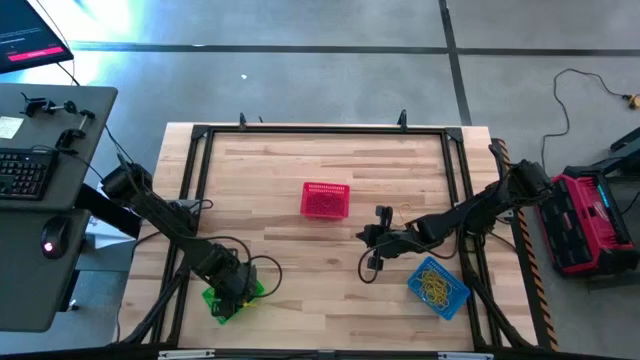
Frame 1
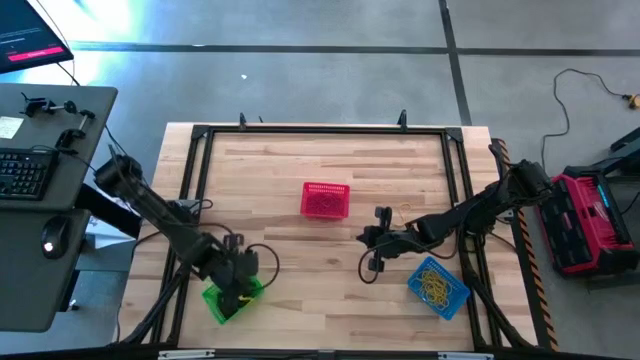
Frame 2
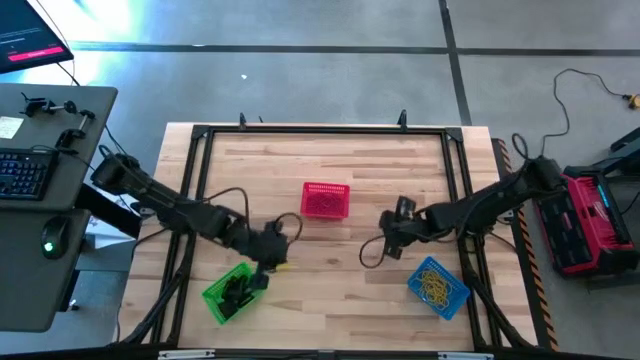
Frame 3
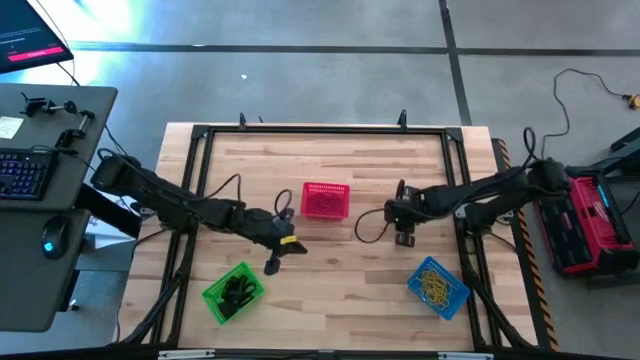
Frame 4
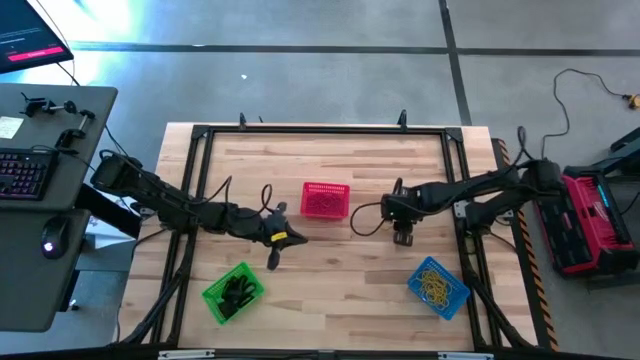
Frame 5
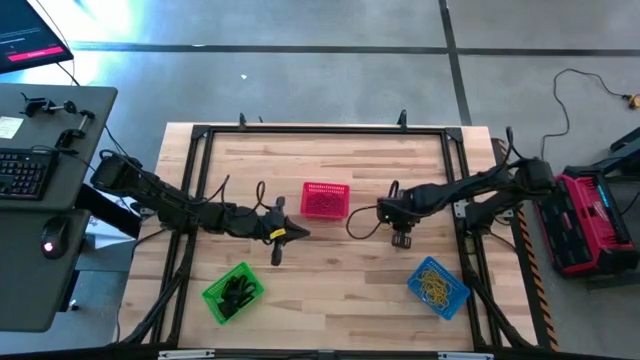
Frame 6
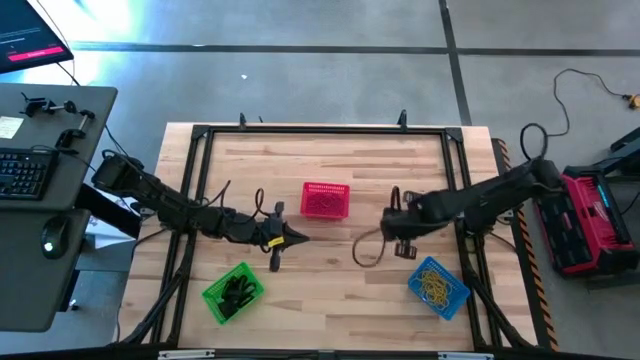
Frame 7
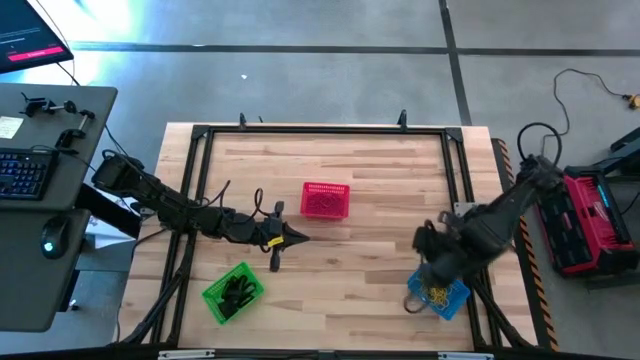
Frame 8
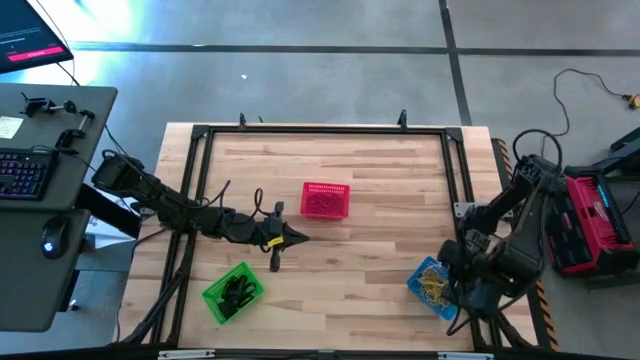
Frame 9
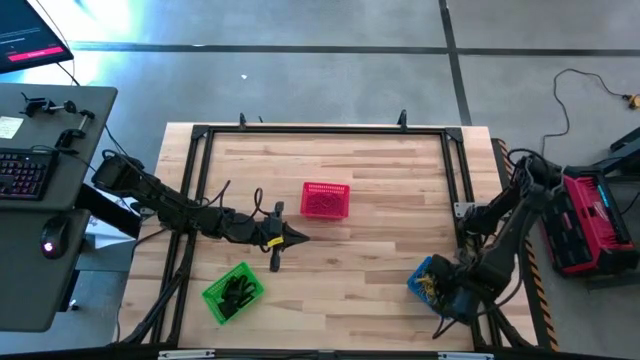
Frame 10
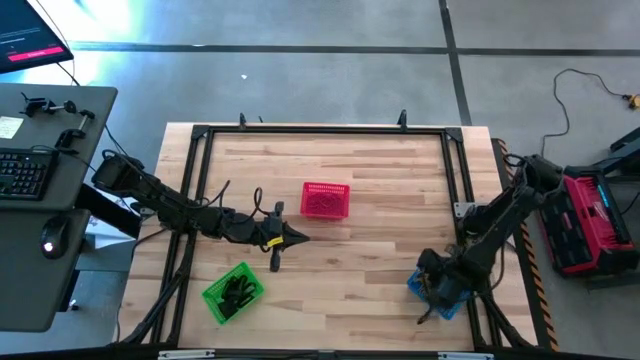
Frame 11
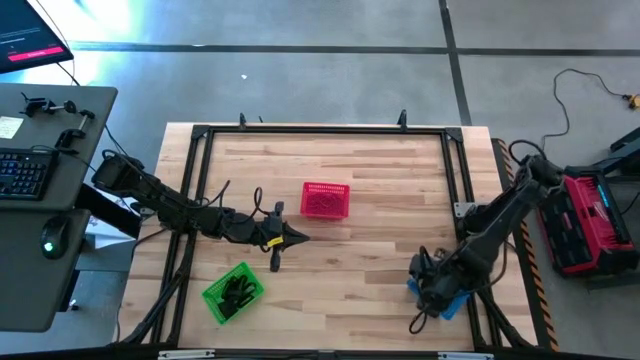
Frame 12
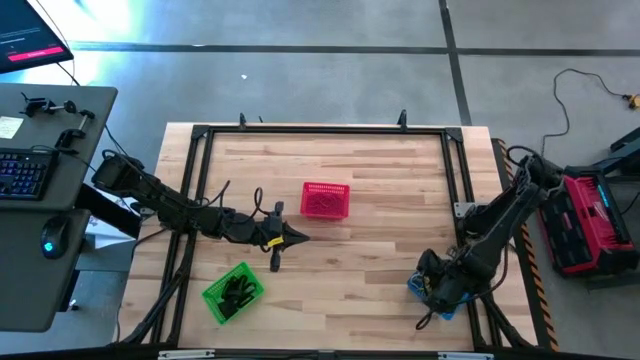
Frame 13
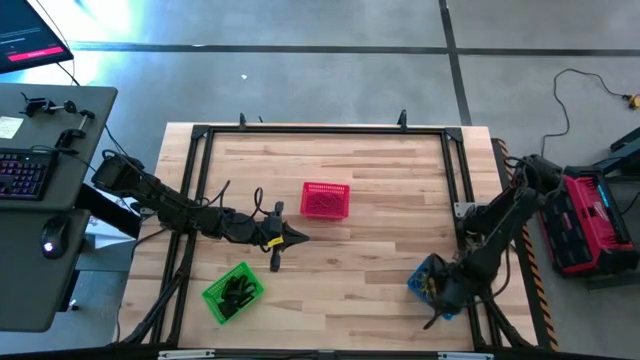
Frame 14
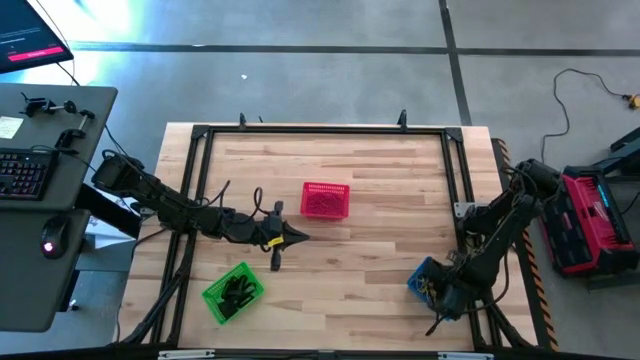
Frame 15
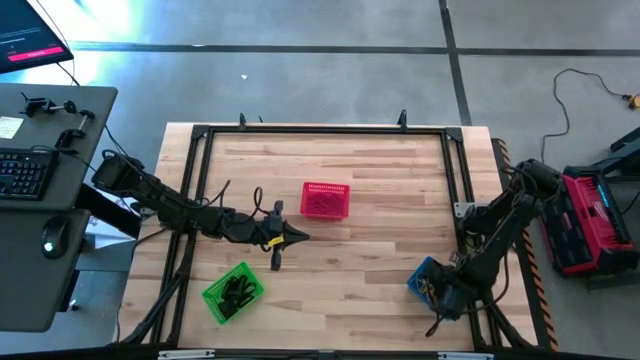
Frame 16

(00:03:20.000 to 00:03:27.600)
Task: Sort rubber bands into baskets
Put the yellow rubber band into the blue bin

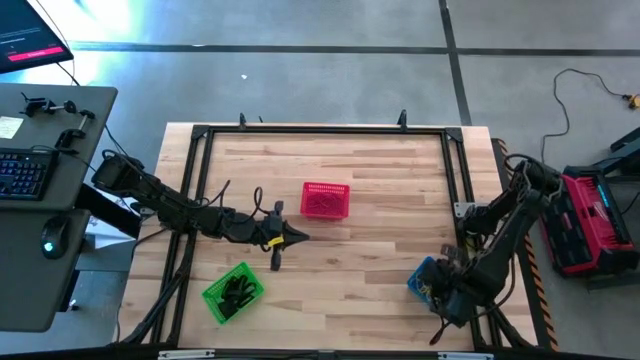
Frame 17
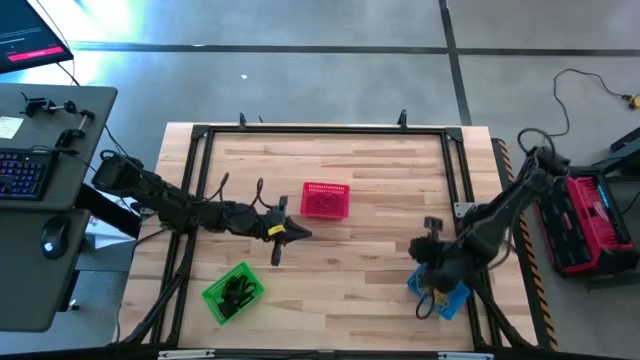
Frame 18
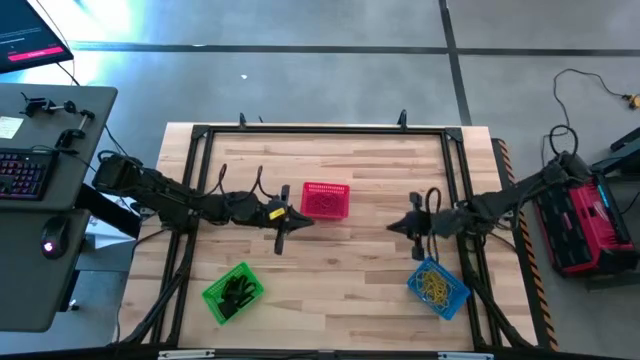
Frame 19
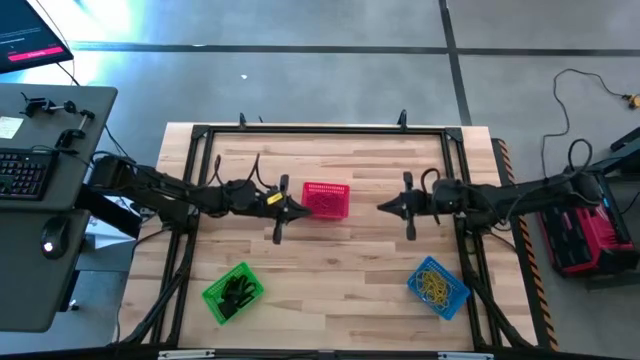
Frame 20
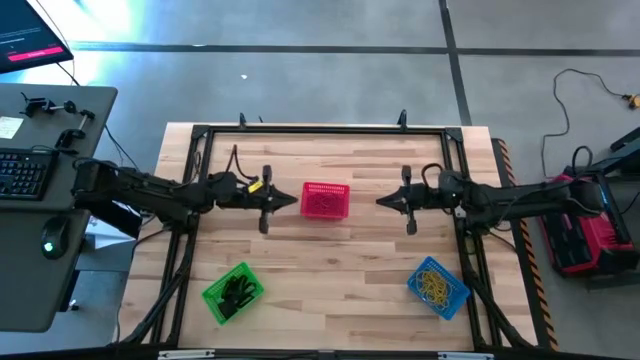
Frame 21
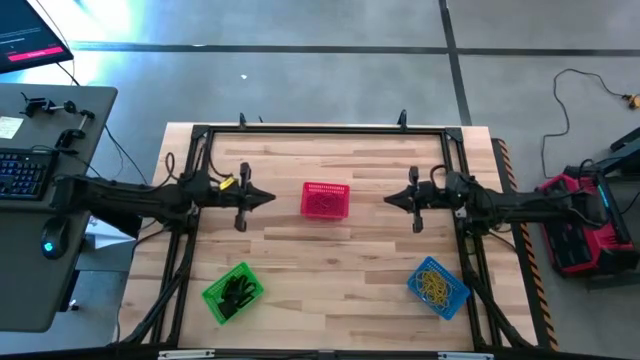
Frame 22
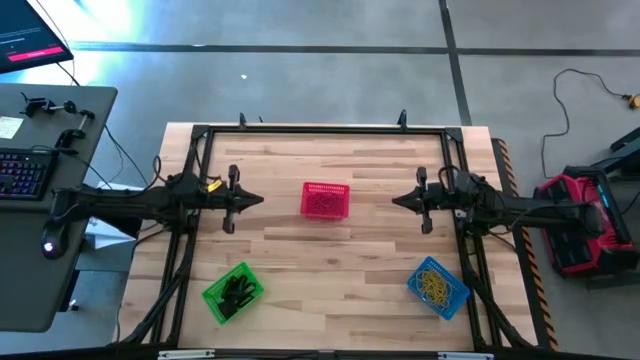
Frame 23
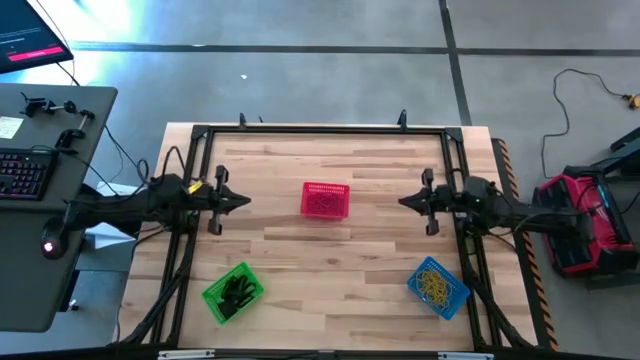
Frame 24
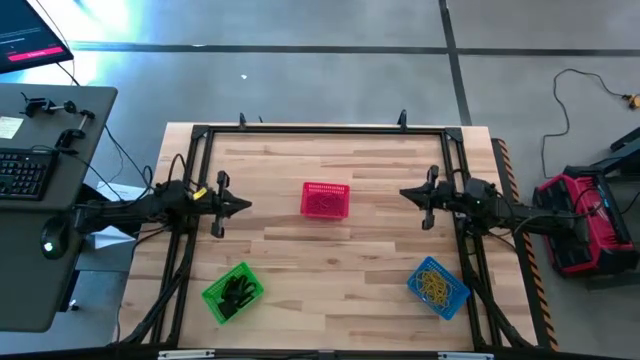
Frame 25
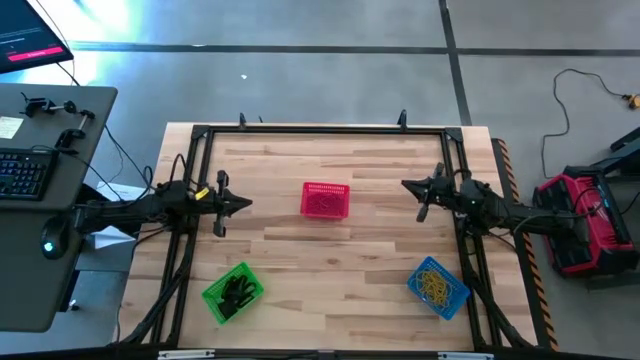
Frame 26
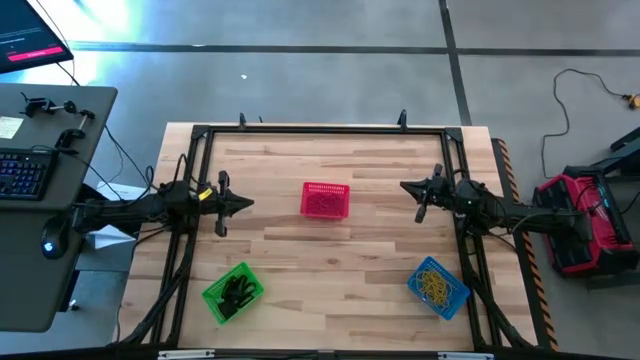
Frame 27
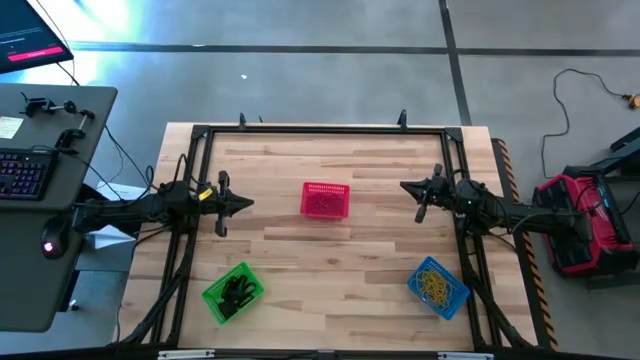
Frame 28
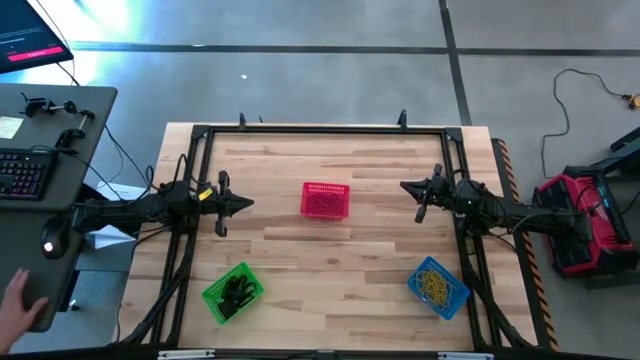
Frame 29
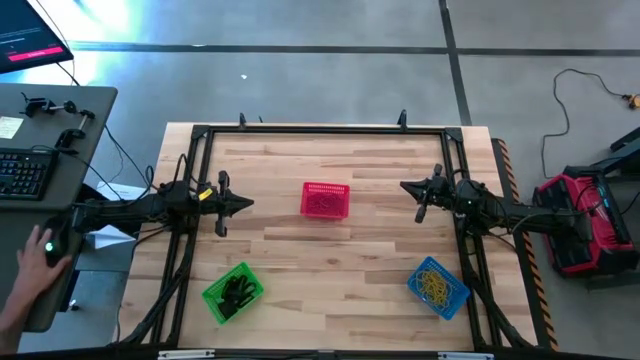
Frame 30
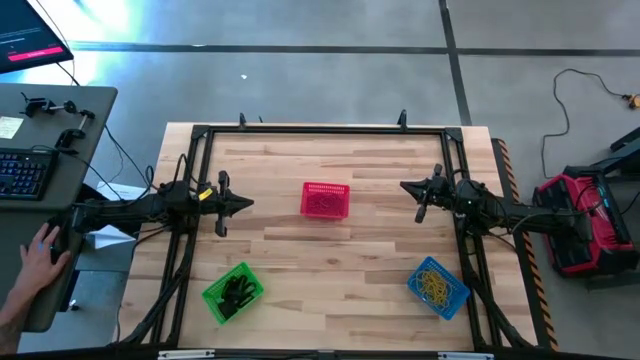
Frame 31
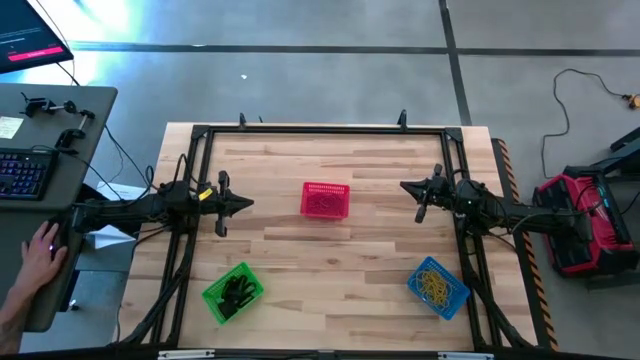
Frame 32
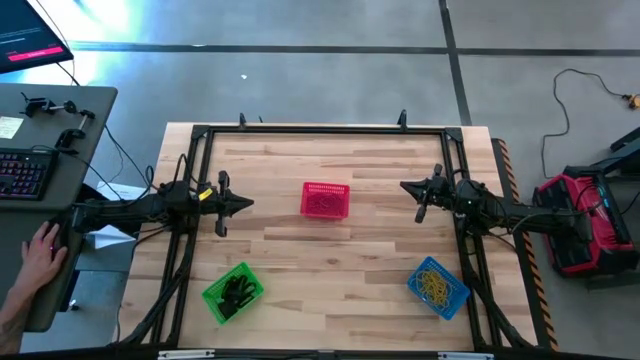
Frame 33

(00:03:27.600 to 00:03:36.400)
Return to Home Position

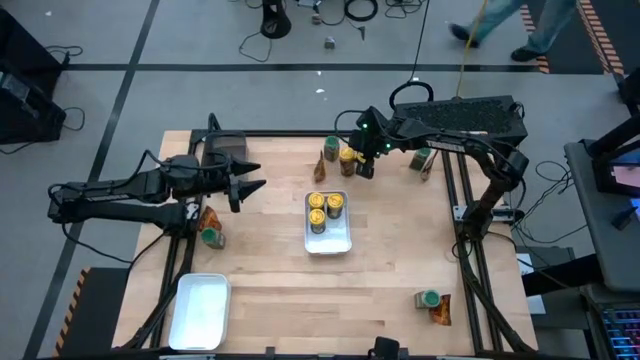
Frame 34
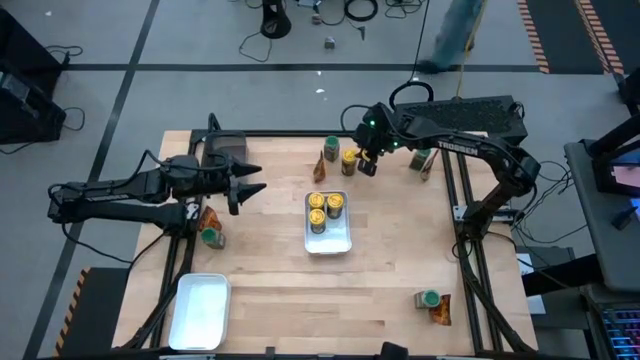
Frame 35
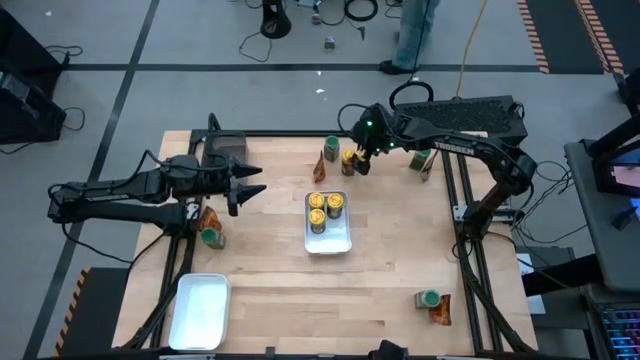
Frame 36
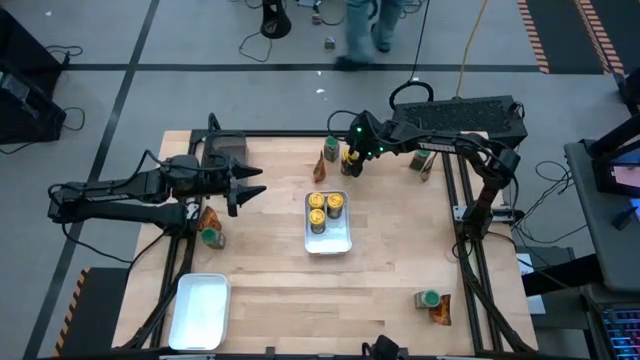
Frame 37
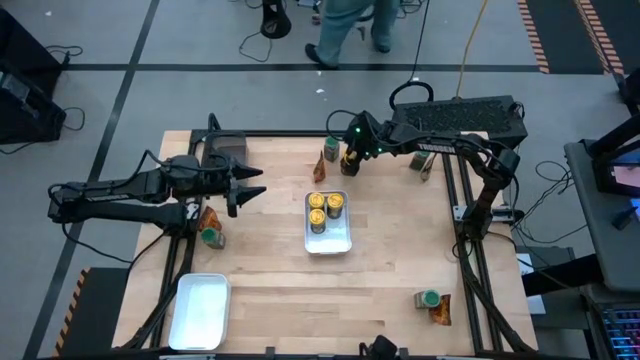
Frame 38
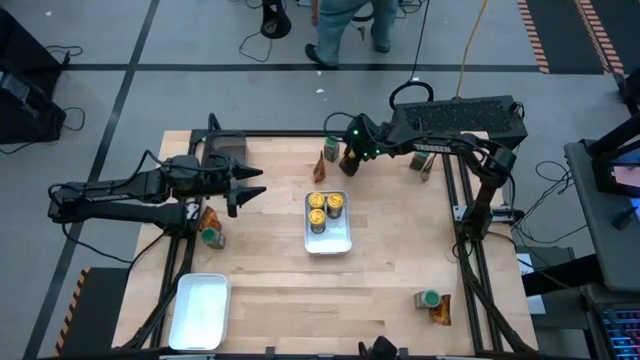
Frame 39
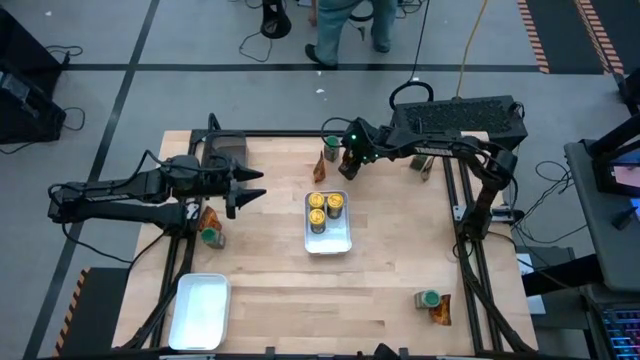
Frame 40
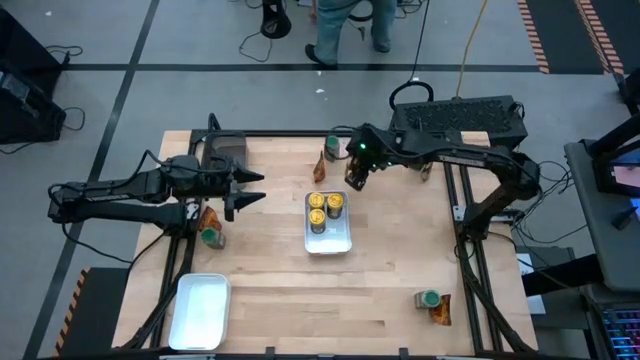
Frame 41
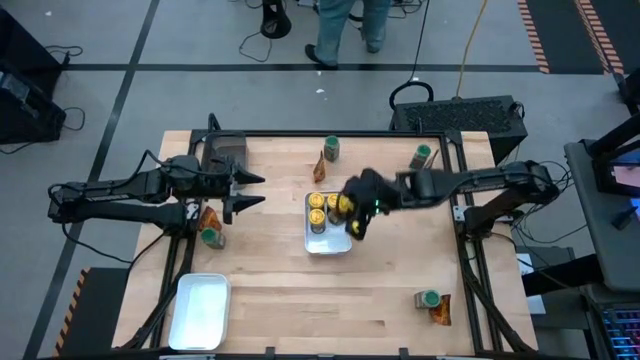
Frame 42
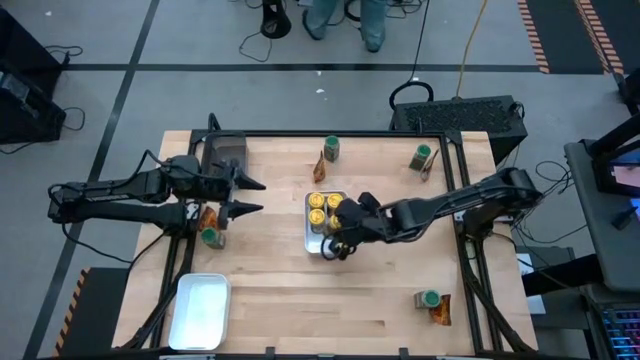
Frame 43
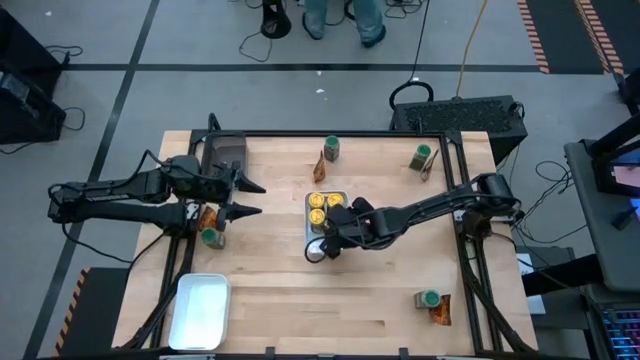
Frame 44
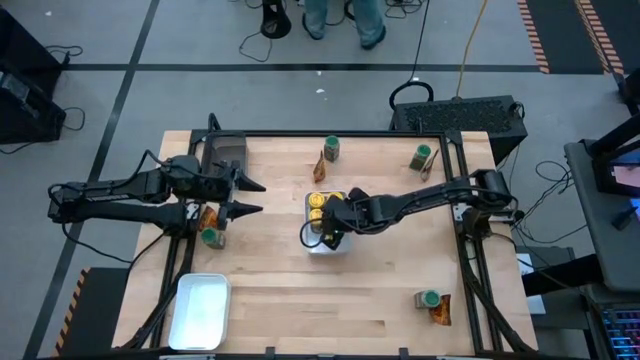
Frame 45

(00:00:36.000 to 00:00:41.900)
Task: Sort spices by type
Put the yellow spice bottle into the top white bin
